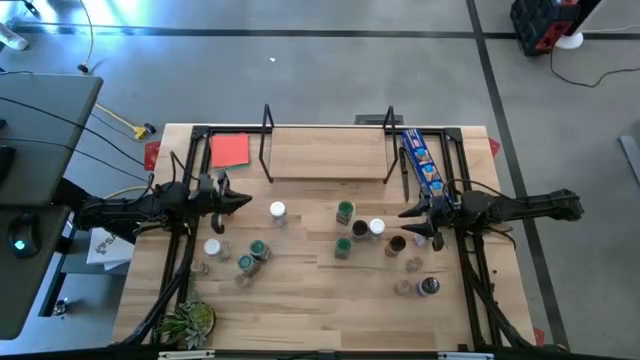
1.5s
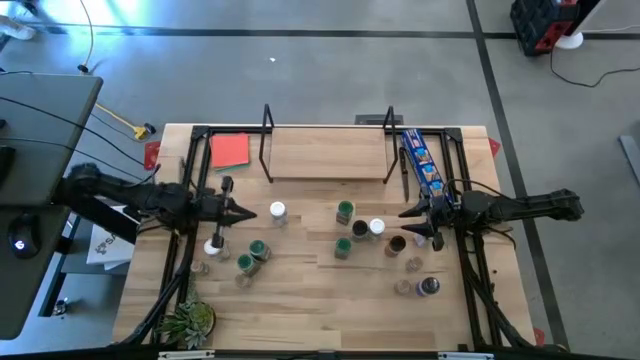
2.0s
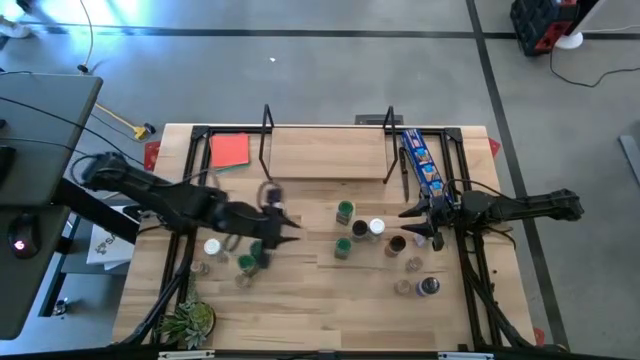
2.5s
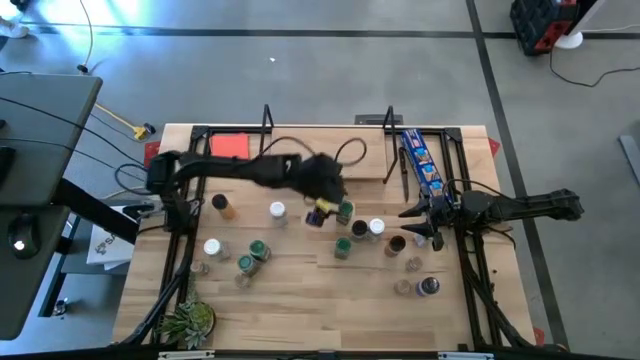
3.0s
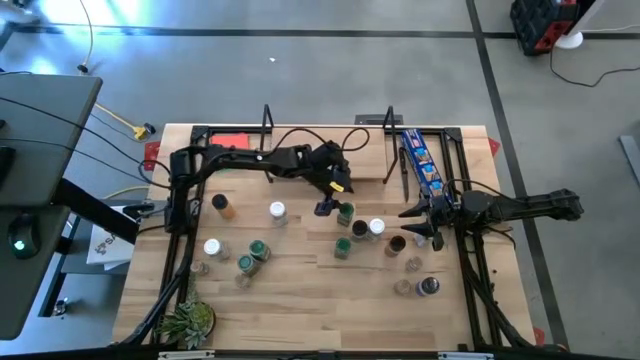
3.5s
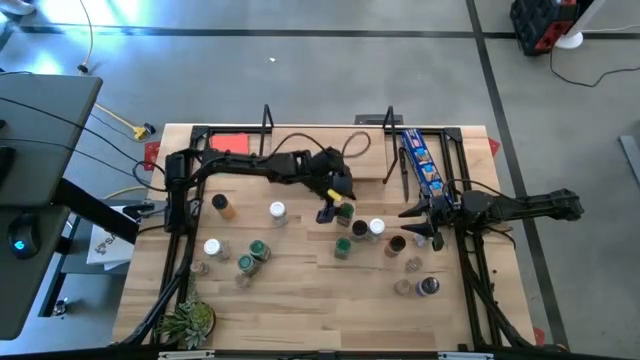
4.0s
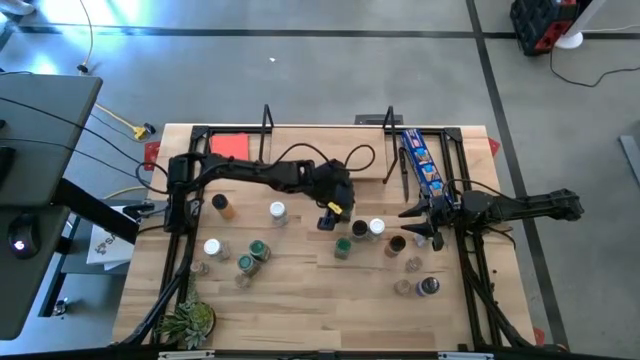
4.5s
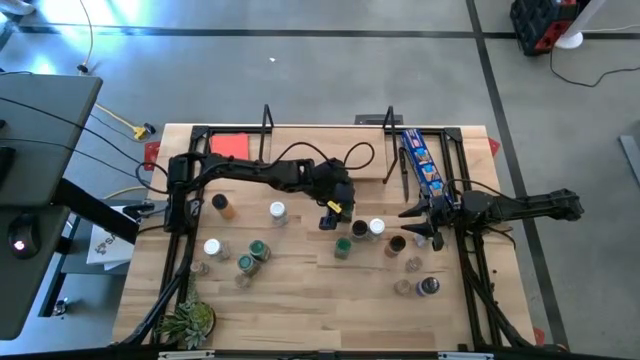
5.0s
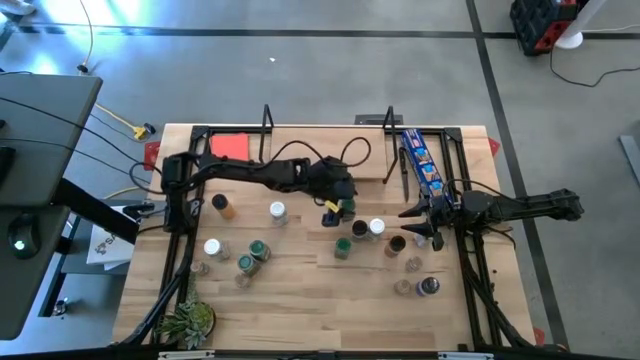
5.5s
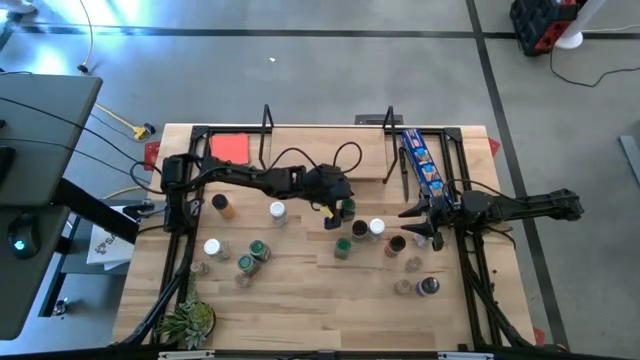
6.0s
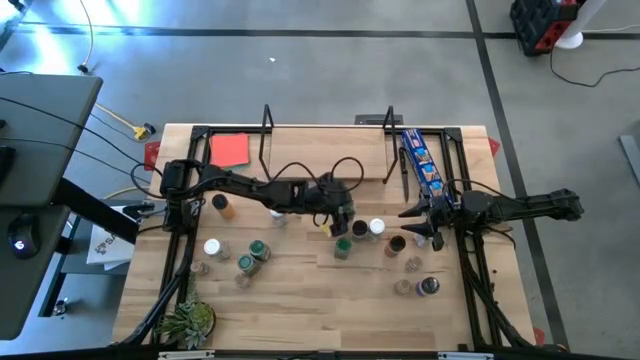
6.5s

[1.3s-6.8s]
Task: Shelf spices
Put the green seasoning bottle on the shelf

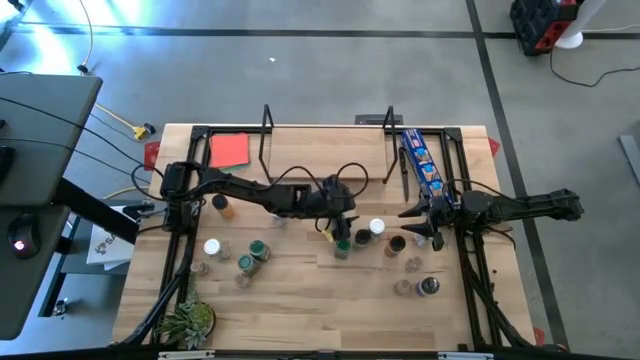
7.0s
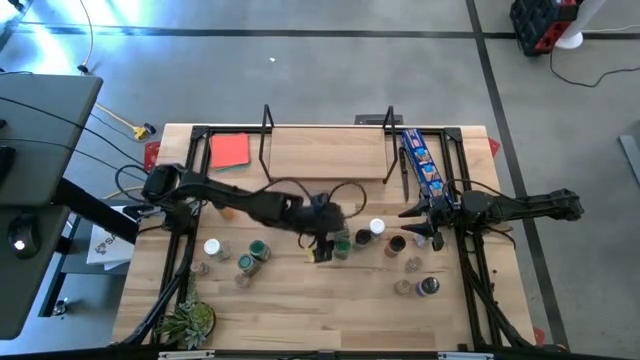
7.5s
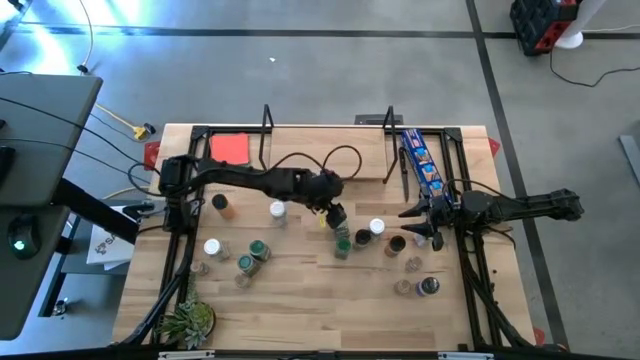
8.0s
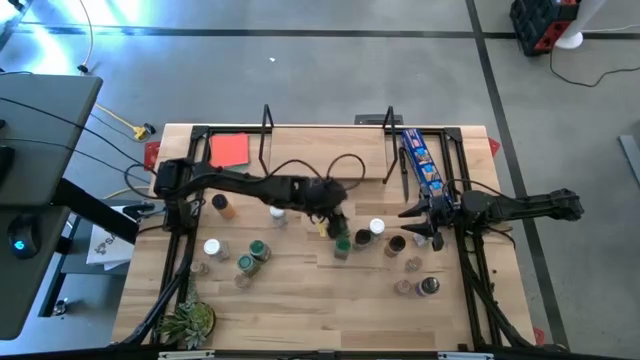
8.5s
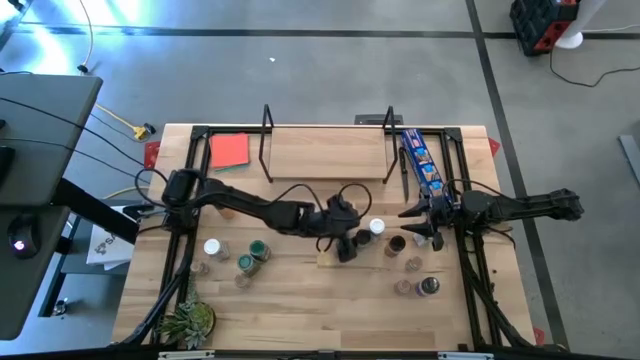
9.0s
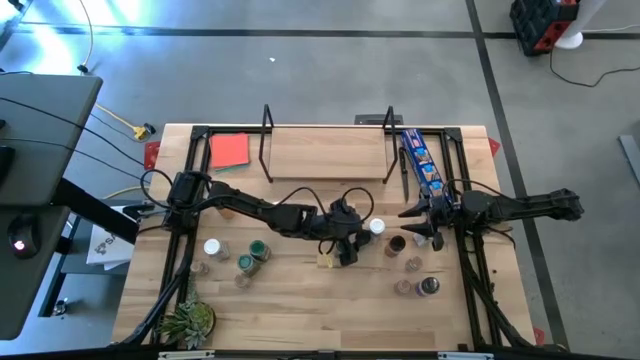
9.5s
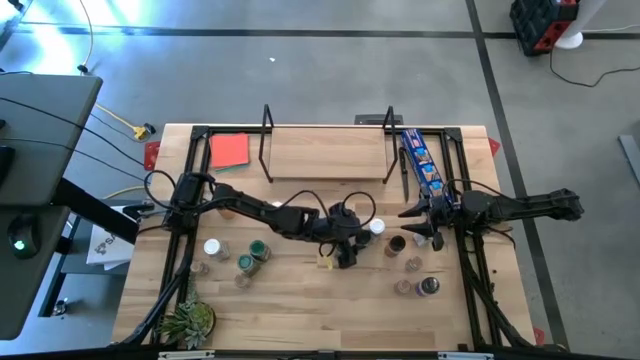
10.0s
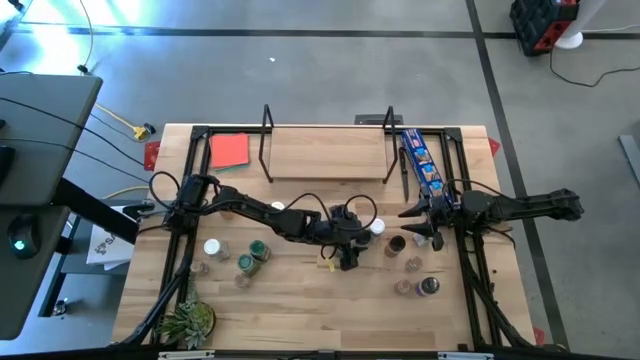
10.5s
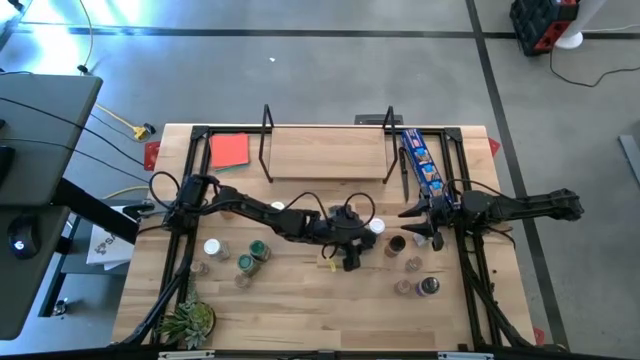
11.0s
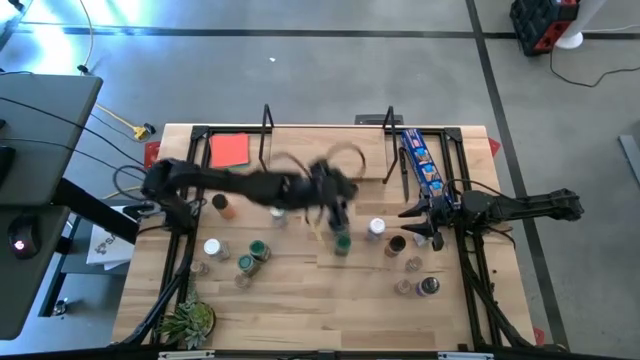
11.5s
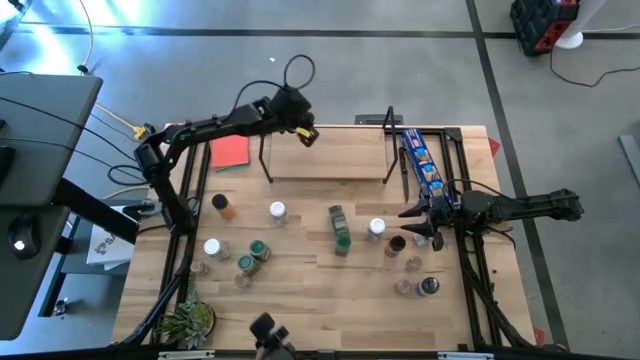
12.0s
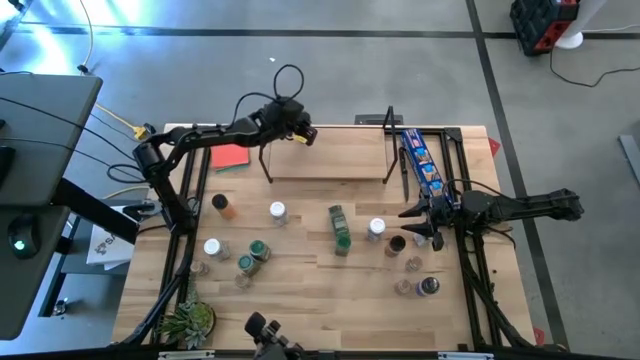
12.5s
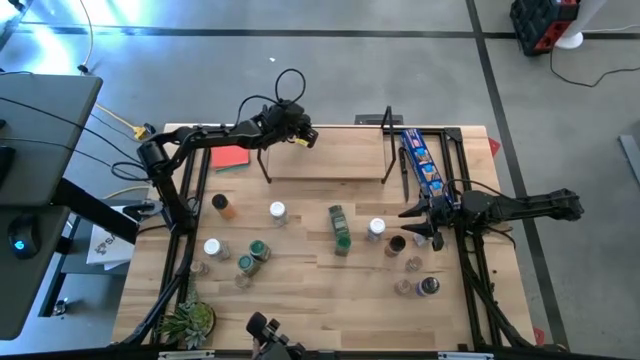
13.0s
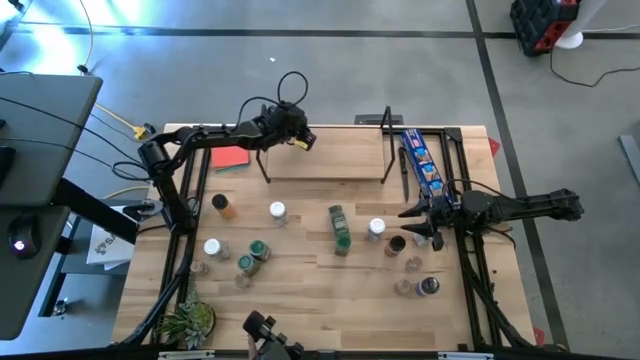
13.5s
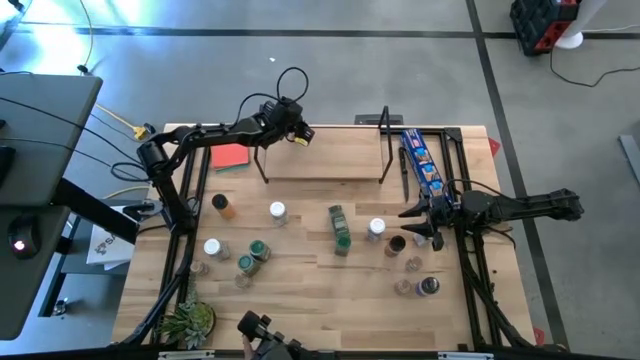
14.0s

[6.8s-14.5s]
Put the black seasoning bottle on the shelf

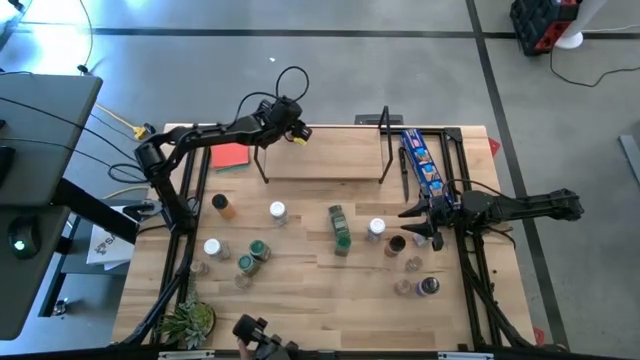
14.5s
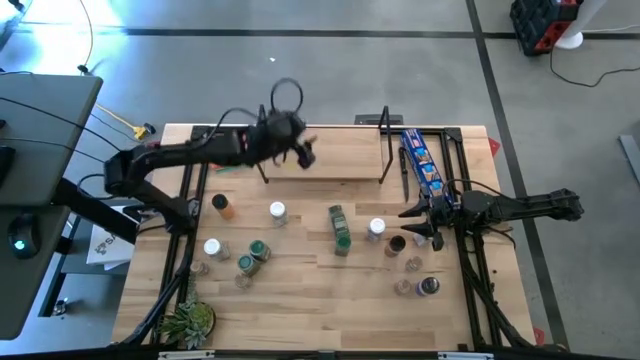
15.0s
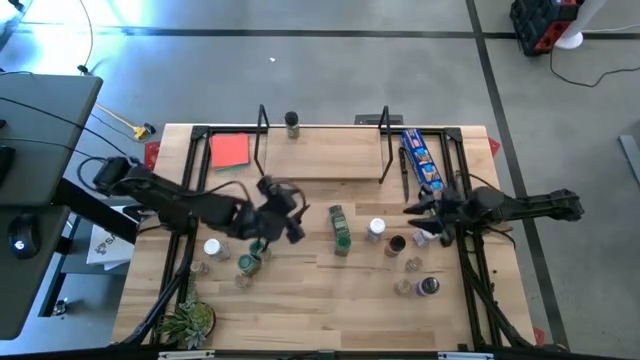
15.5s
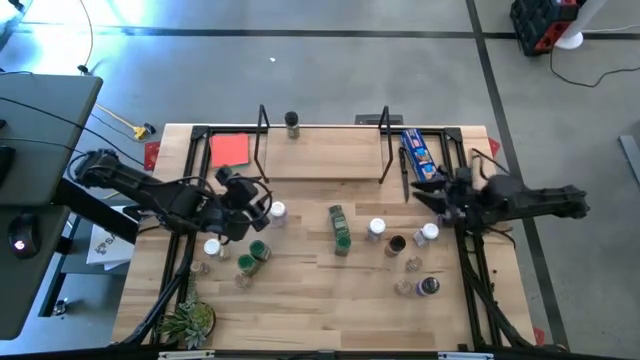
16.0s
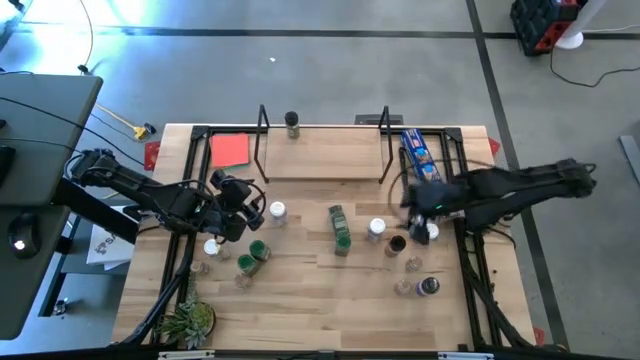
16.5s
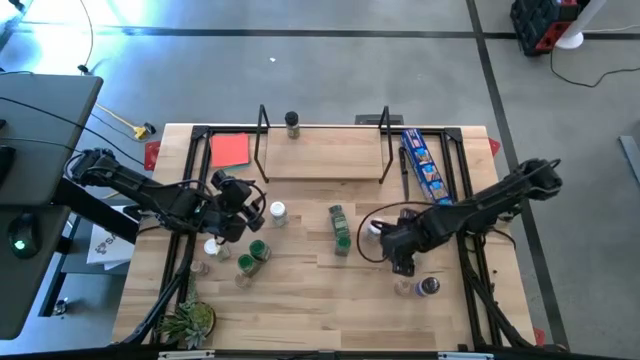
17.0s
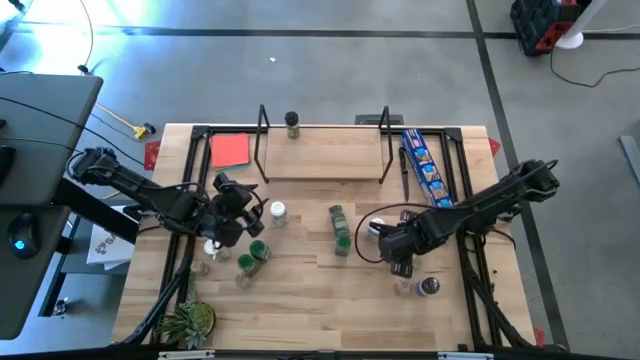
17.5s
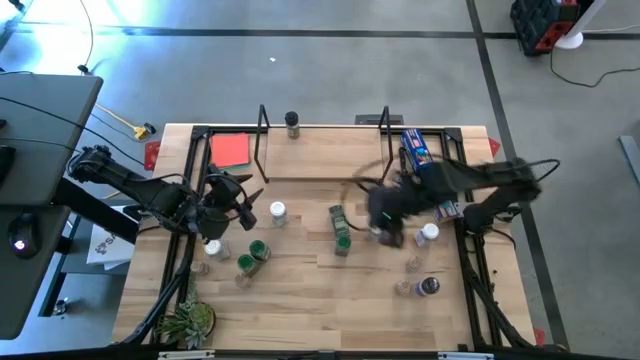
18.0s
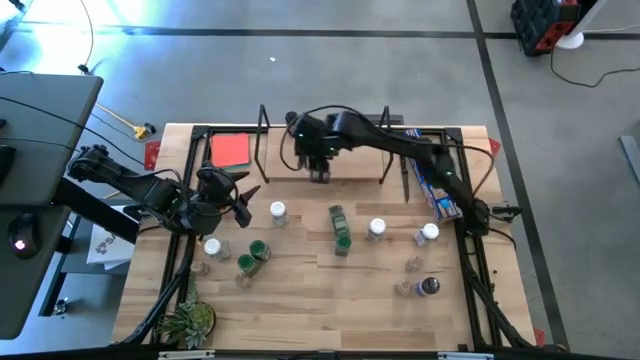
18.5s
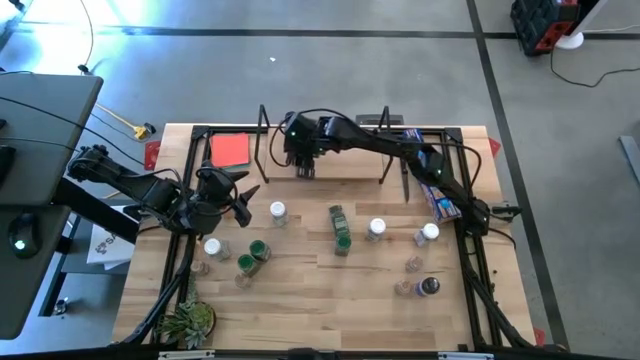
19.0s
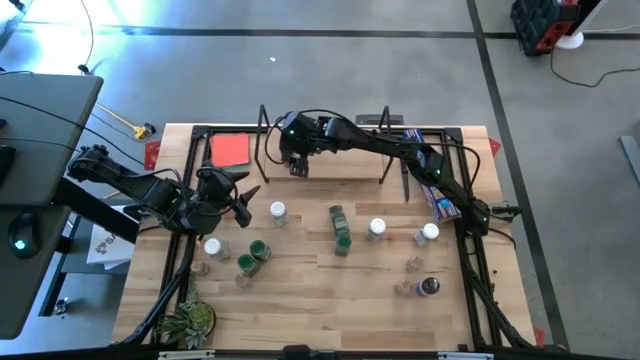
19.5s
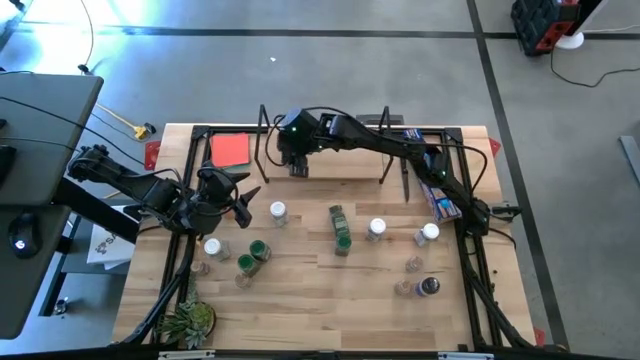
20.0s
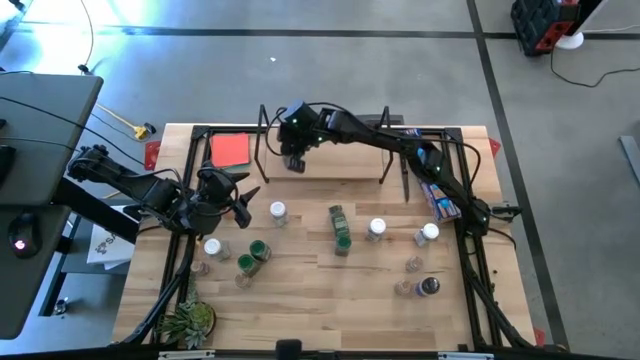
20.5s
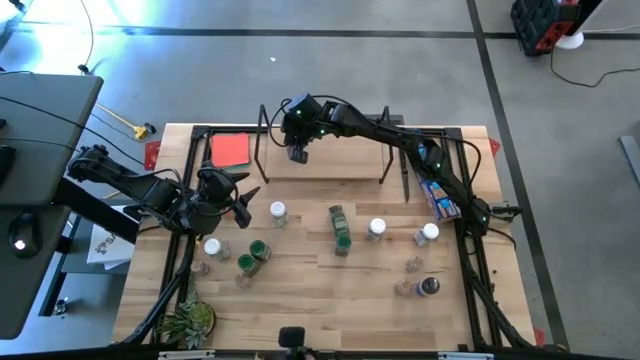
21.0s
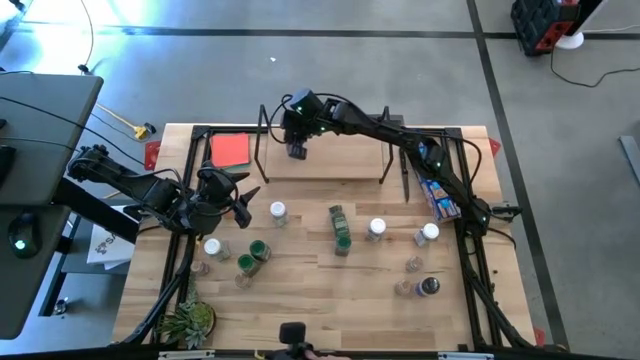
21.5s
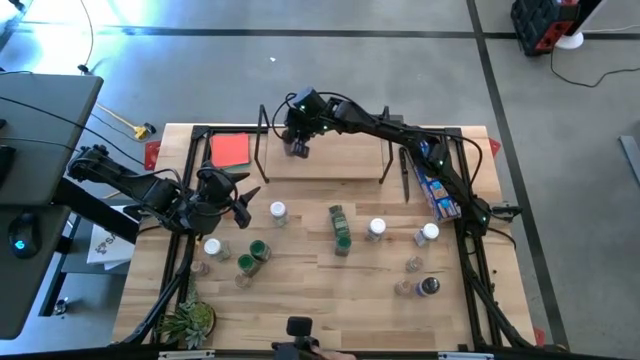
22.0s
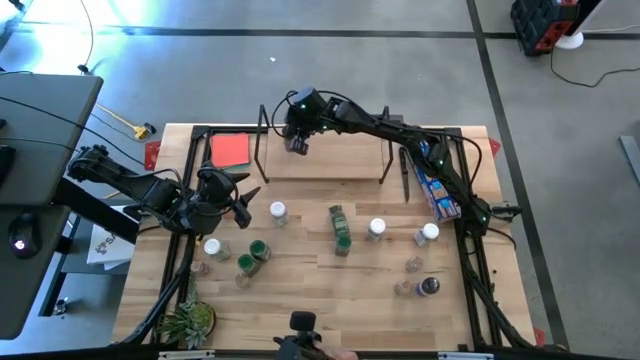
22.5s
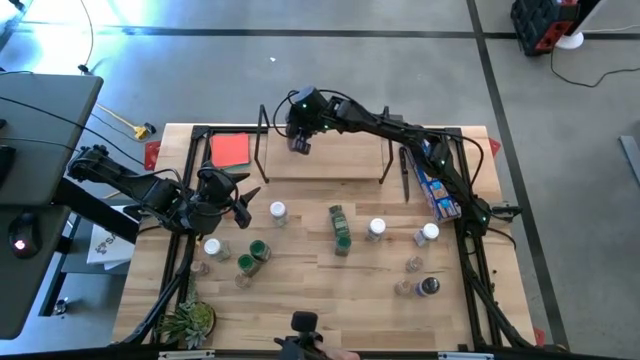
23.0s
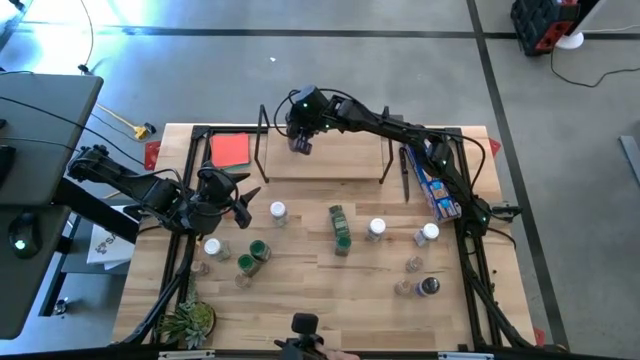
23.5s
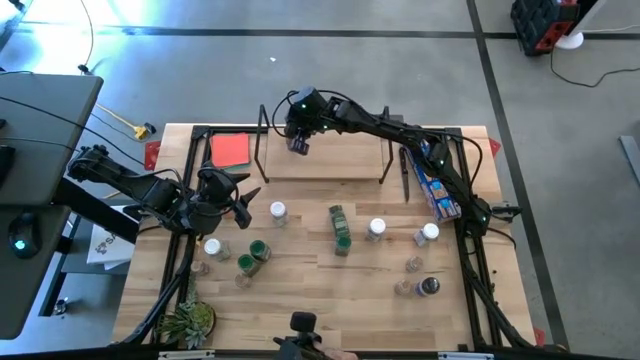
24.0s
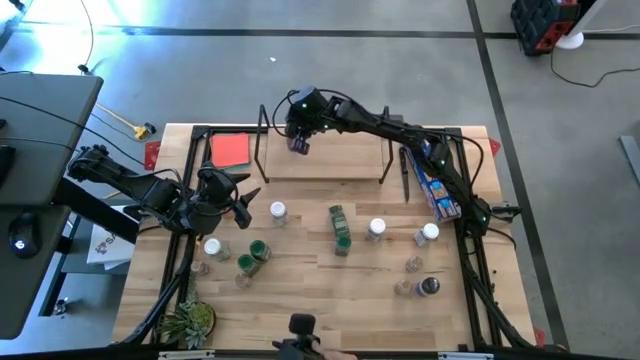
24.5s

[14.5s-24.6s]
Put the black seasoning bottle on the shelf aligned with the other black seasoning bottles
